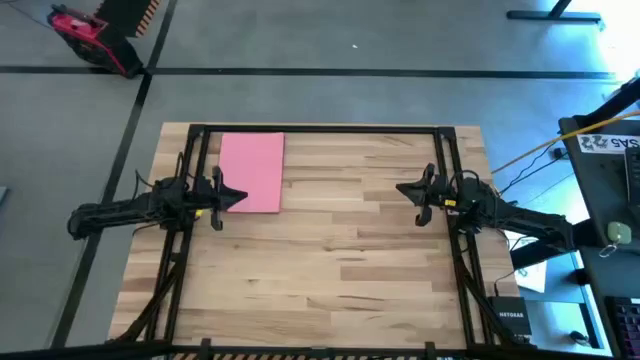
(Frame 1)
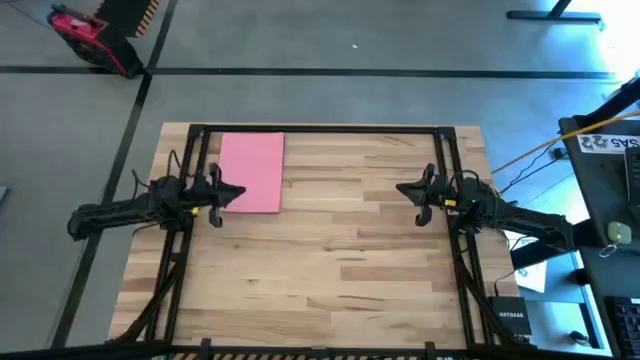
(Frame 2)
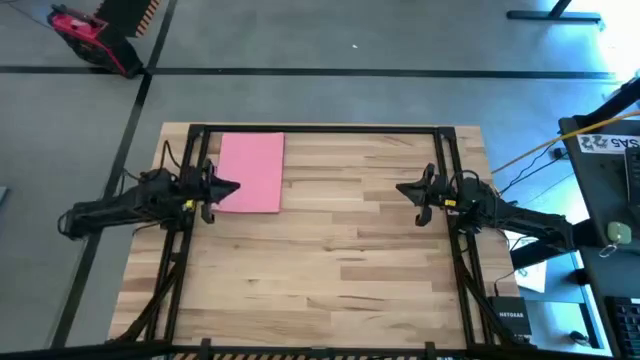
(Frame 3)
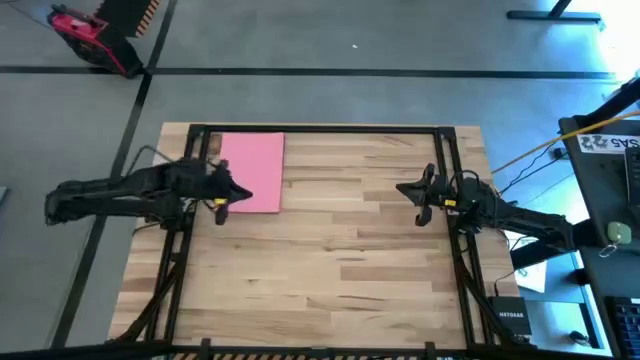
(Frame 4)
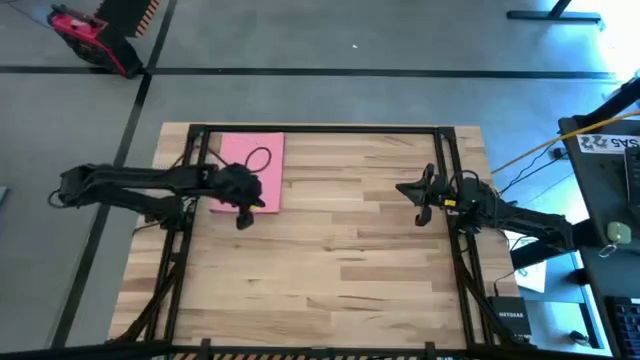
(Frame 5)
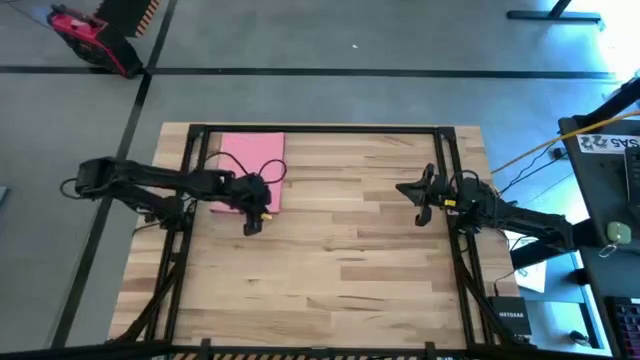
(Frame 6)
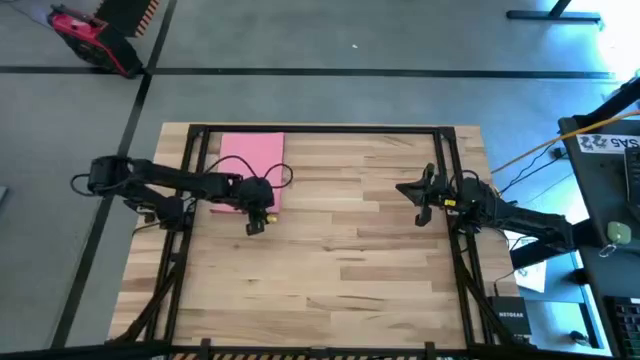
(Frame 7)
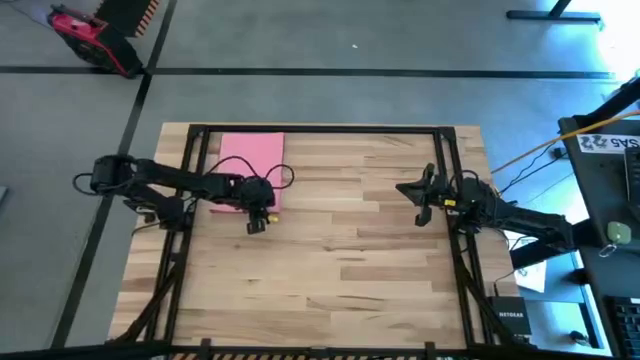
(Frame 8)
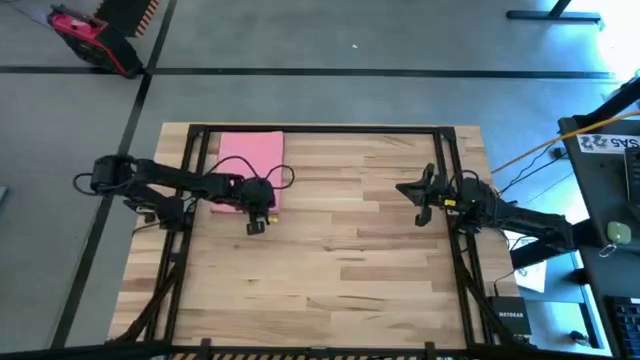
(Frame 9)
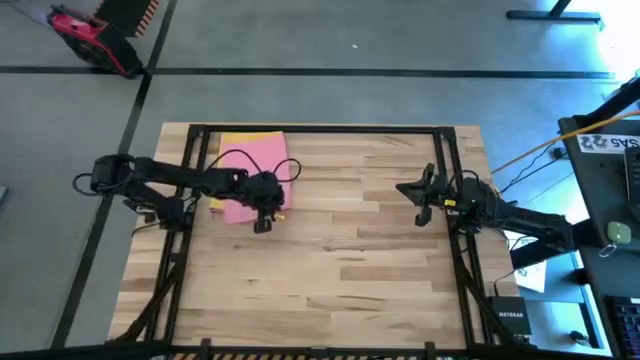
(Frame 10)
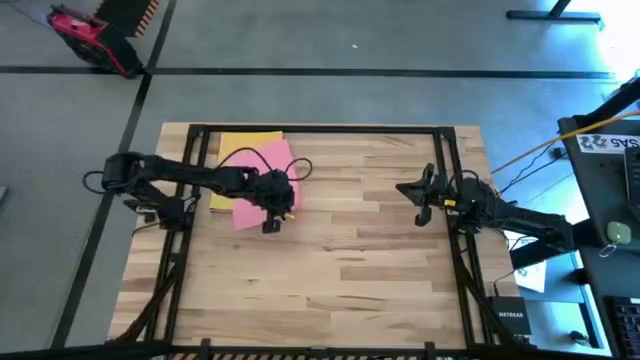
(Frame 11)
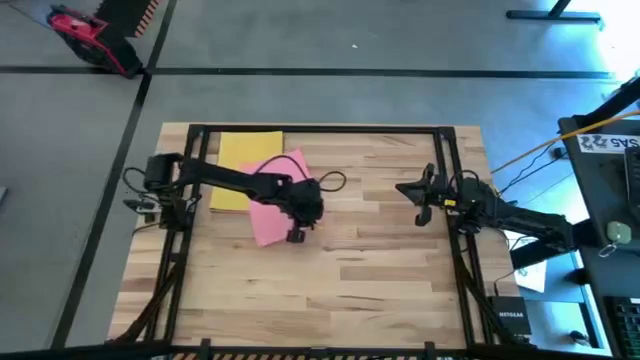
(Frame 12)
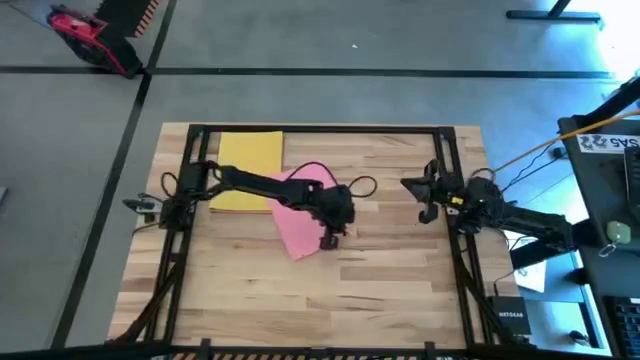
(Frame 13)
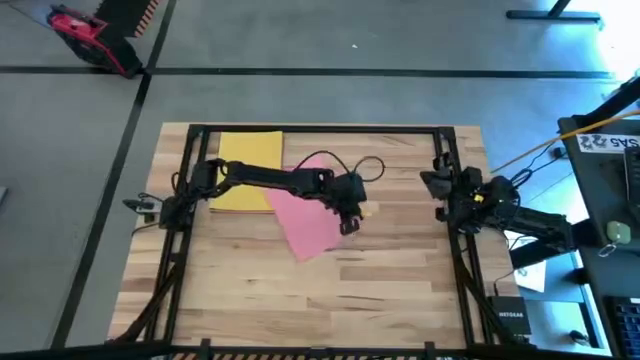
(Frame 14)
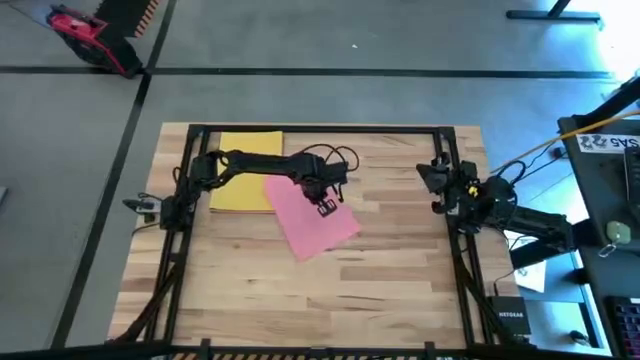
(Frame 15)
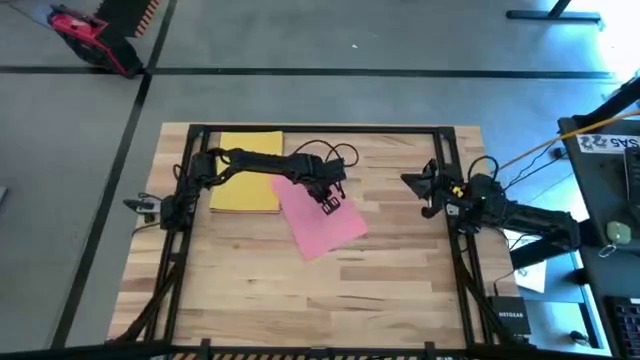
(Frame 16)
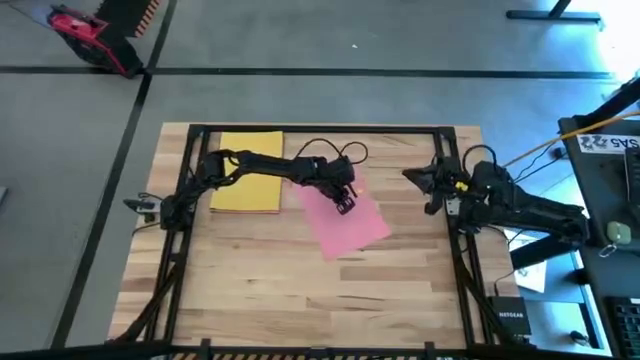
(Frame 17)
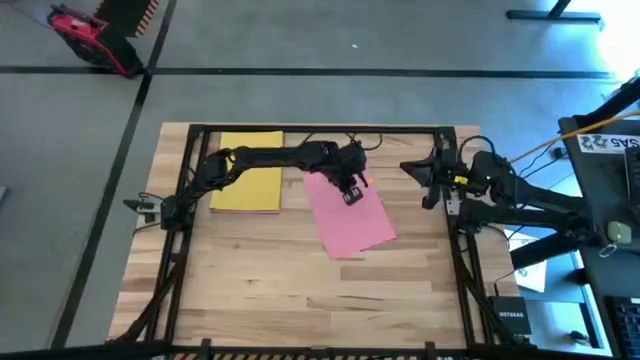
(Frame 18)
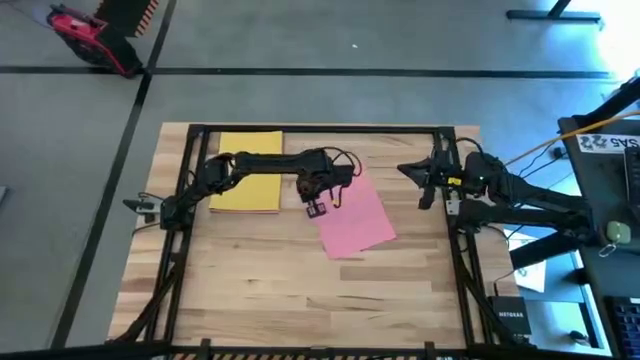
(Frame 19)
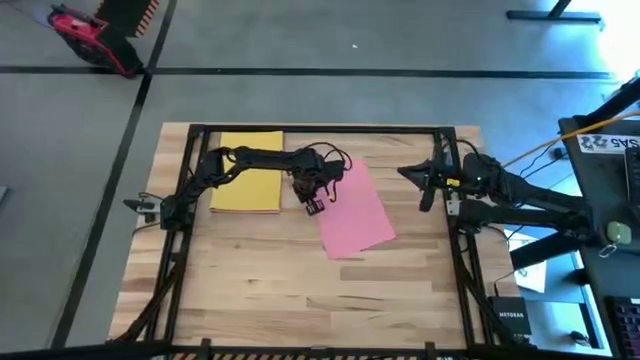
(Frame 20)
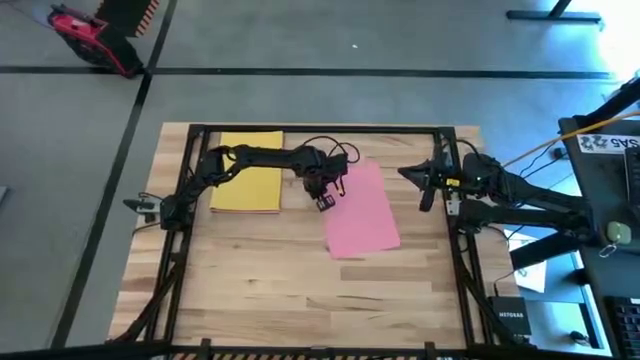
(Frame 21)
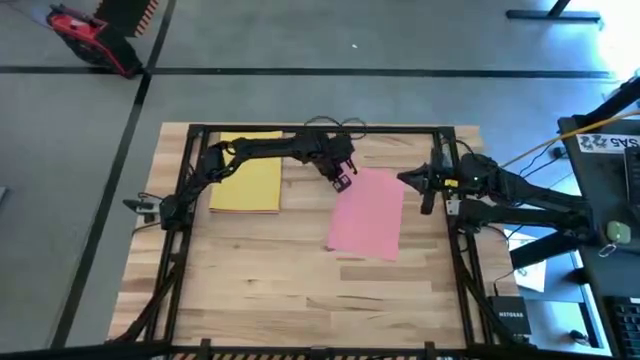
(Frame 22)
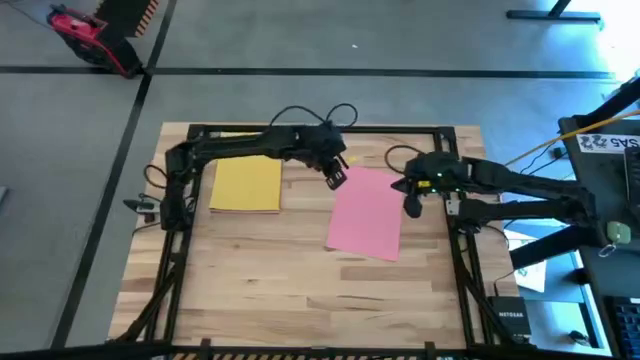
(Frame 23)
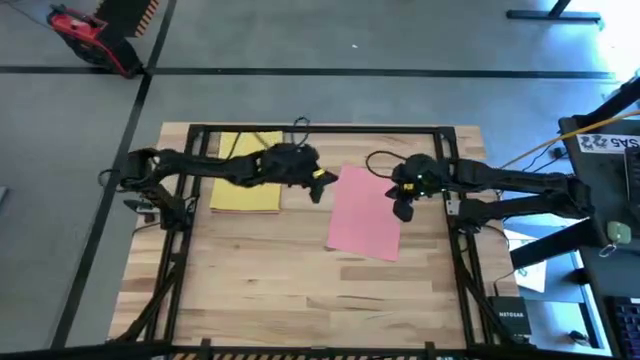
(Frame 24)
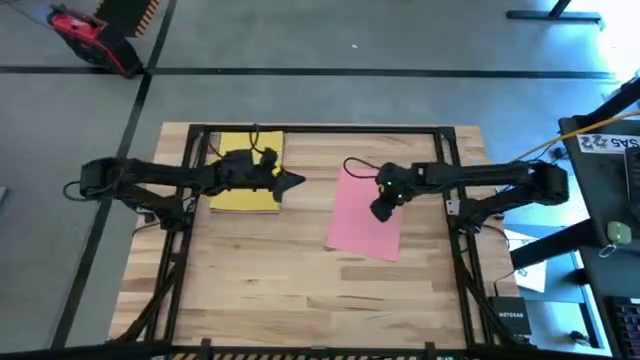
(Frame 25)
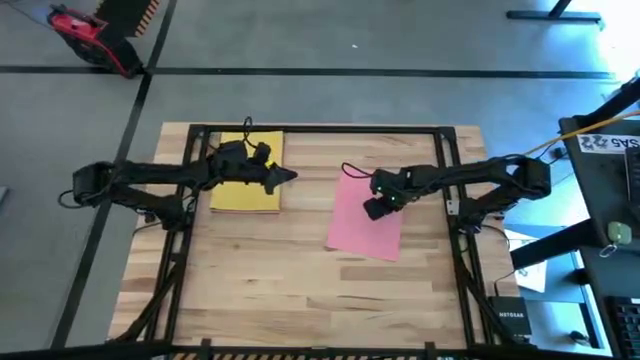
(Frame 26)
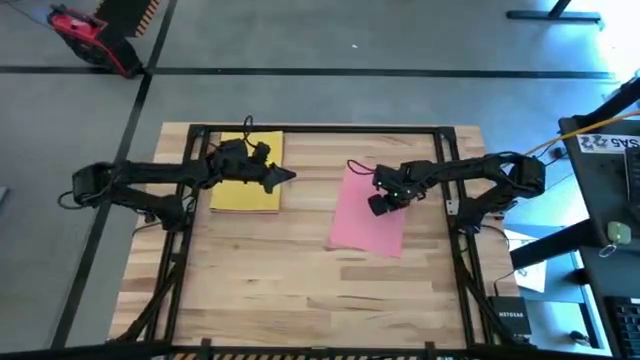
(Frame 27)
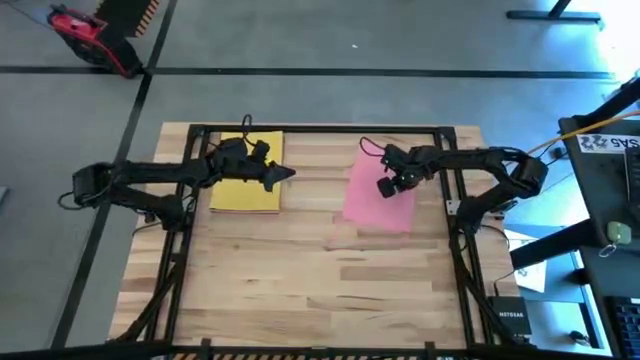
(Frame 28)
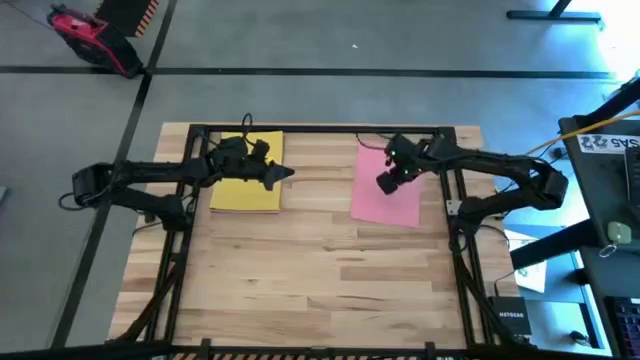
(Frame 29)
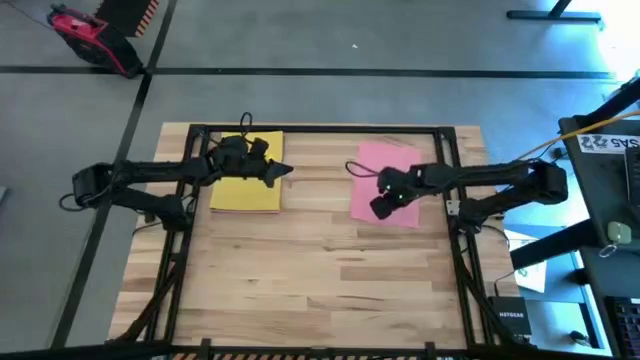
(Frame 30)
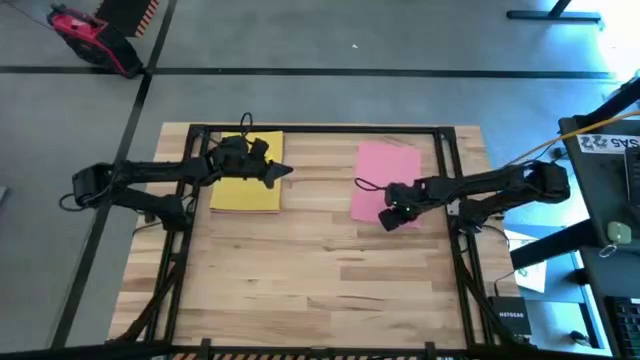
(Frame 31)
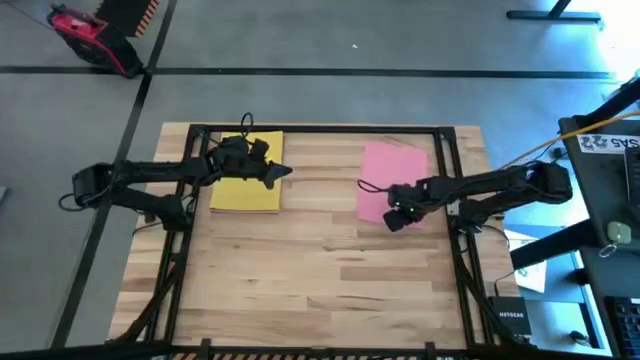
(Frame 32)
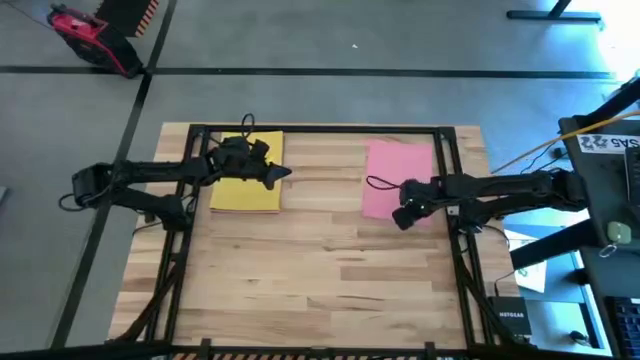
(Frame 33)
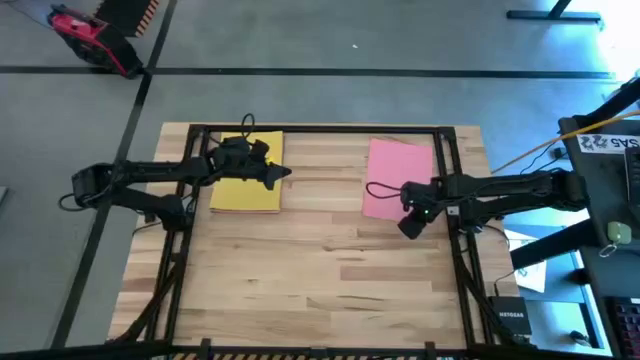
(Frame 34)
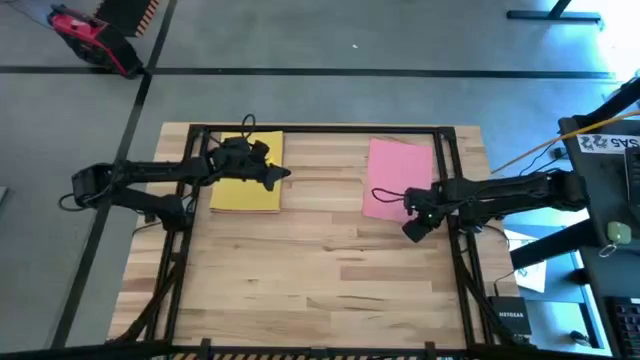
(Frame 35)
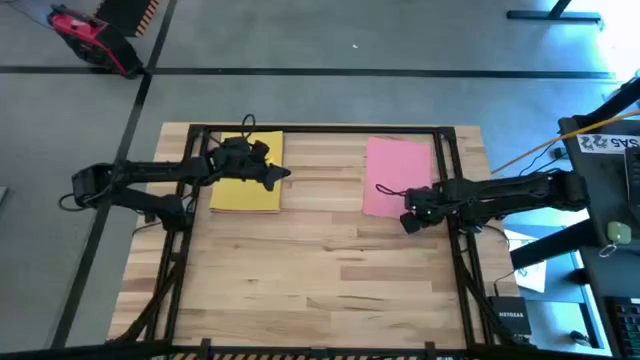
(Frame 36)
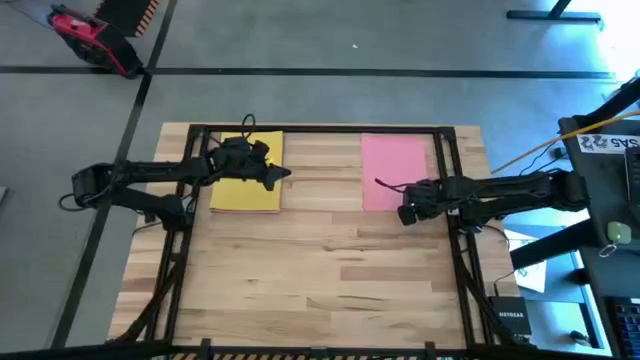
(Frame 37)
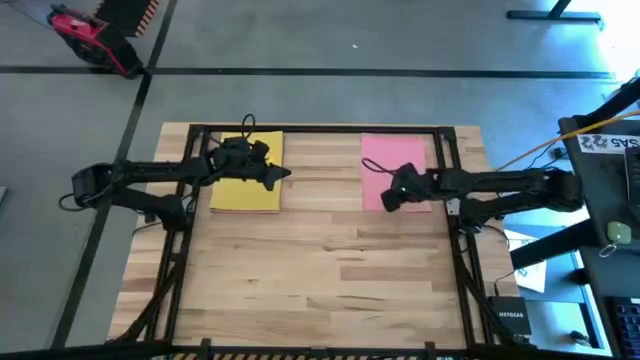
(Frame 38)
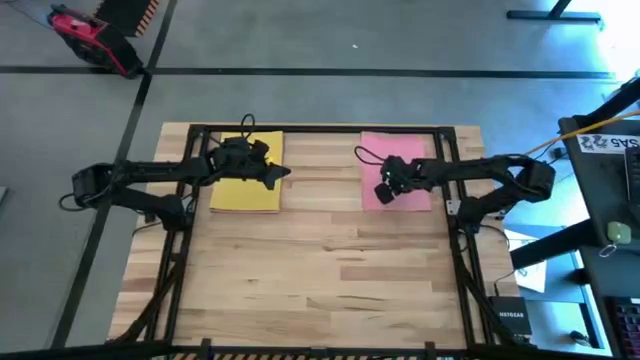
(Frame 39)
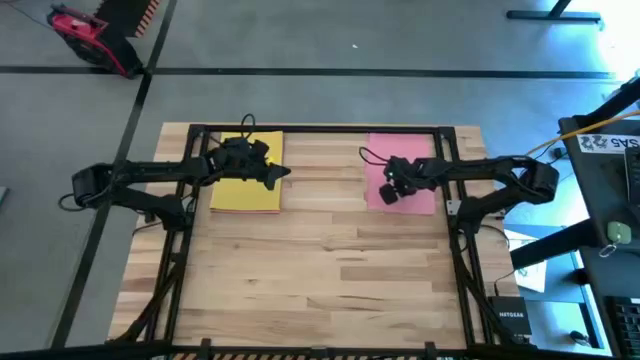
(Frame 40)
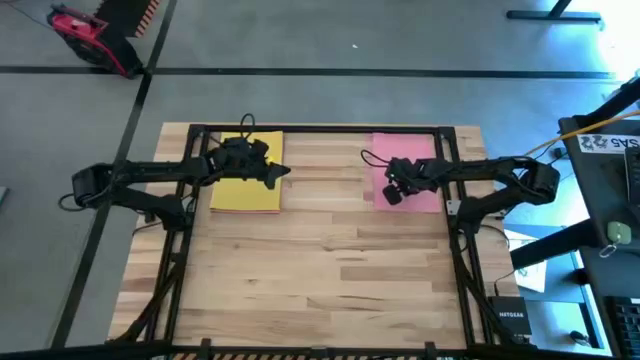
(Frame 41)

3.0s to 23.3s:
Task: Organize paper
Move the pink paper to the top right of the table

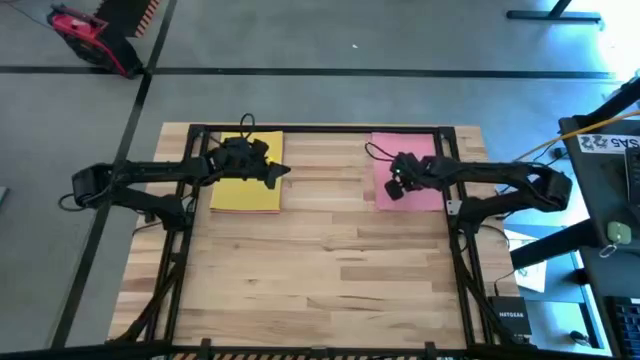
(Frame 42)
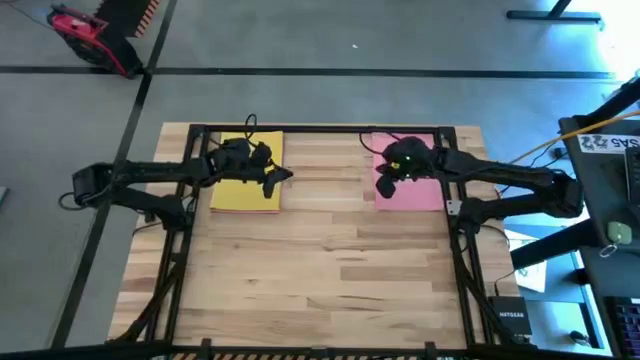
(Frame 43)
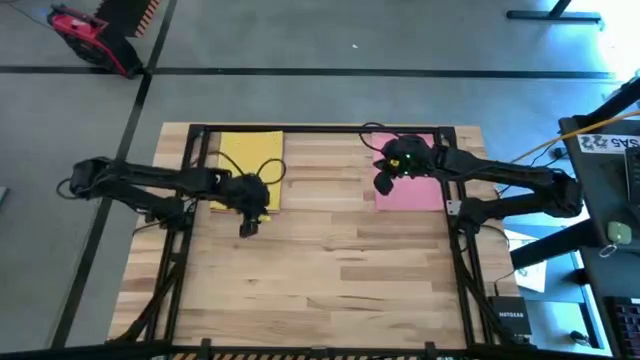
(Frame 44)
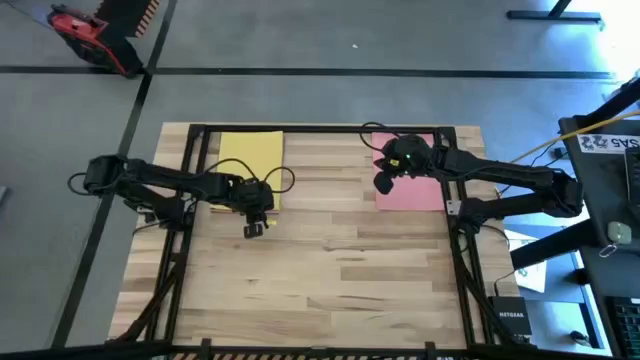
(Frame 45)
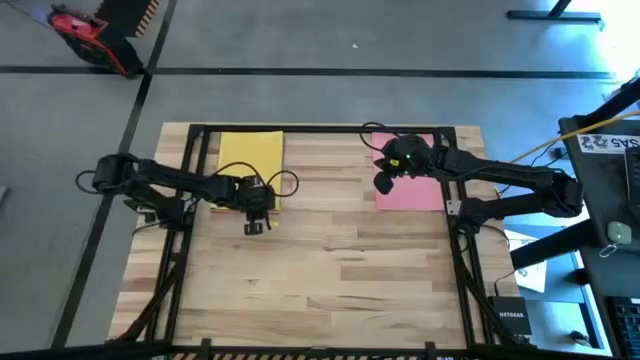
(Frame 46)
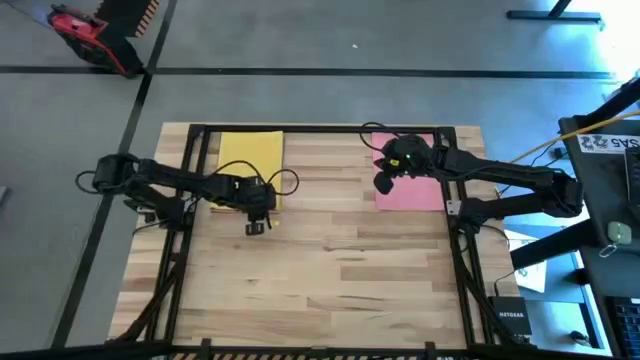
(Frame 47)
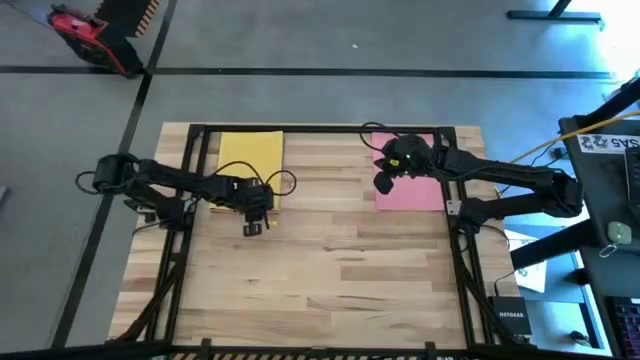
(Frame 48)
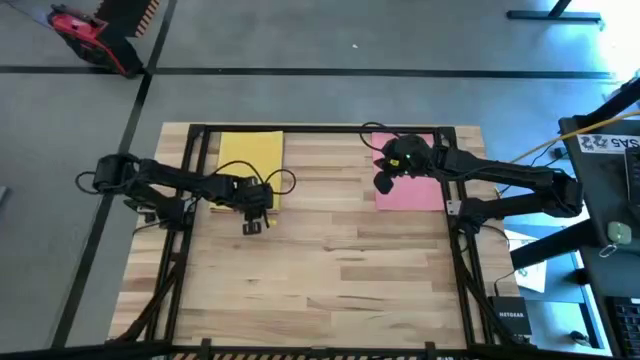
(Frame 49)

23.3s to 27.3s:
Move the yellow paper to the bottom left of the table
